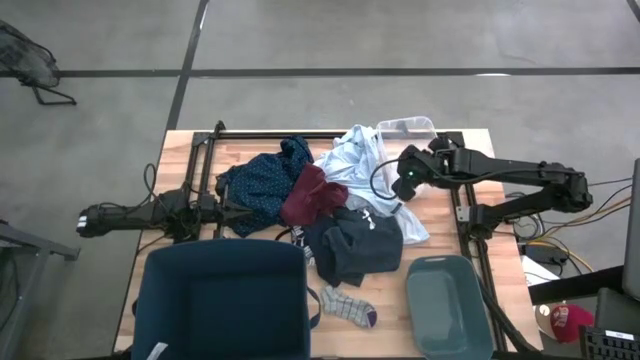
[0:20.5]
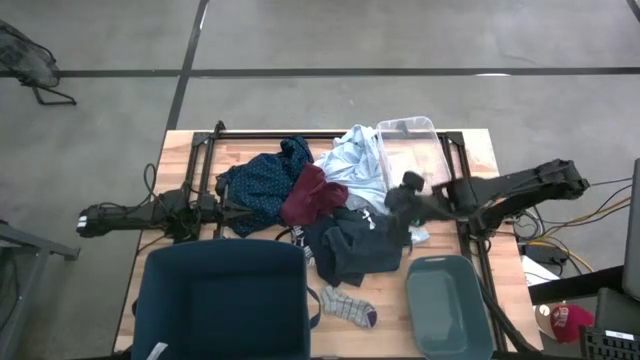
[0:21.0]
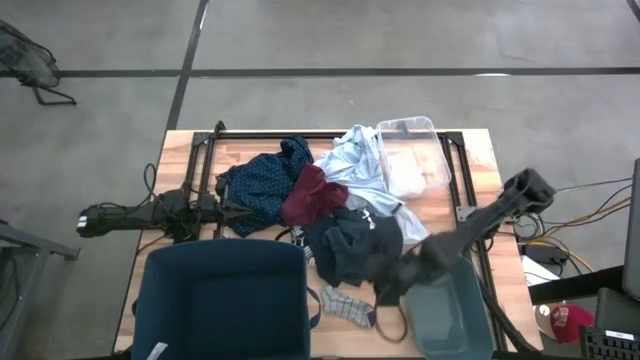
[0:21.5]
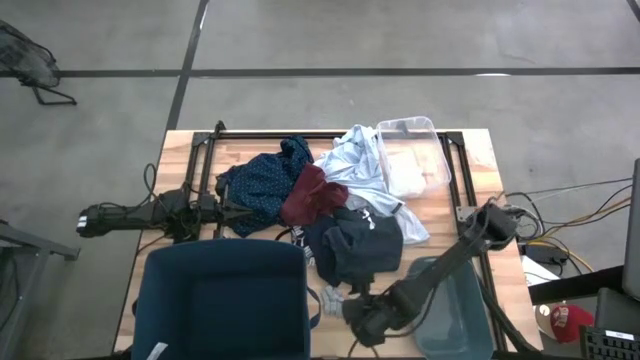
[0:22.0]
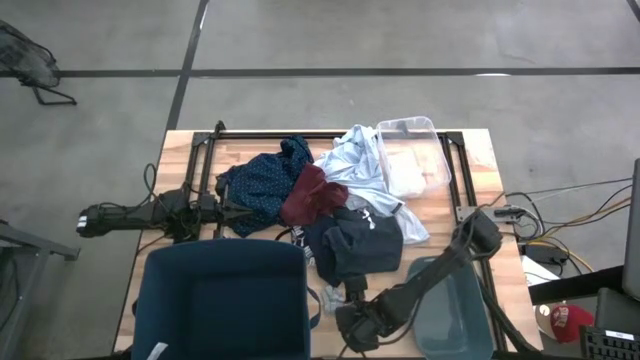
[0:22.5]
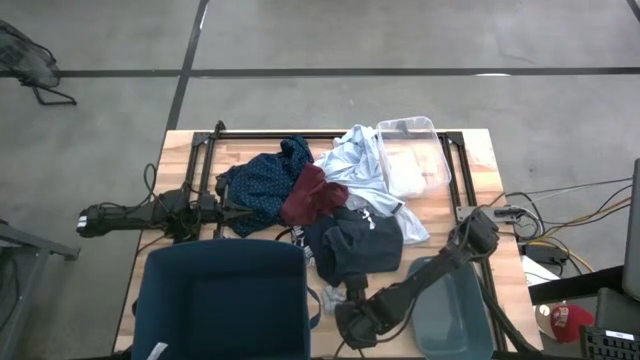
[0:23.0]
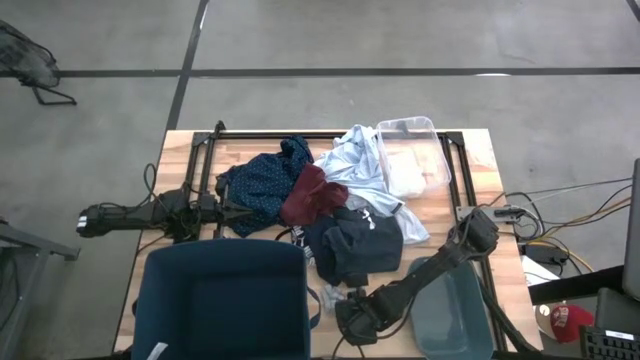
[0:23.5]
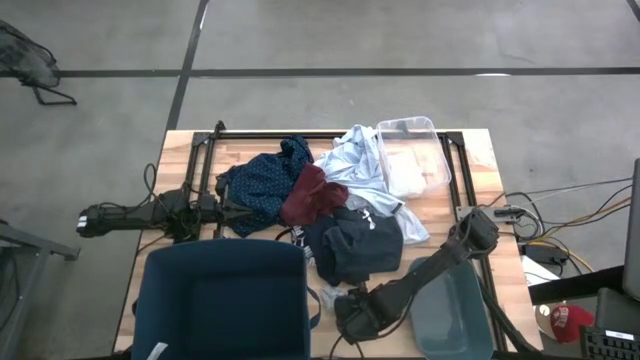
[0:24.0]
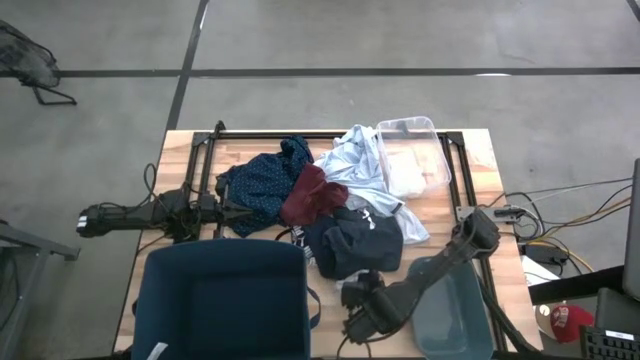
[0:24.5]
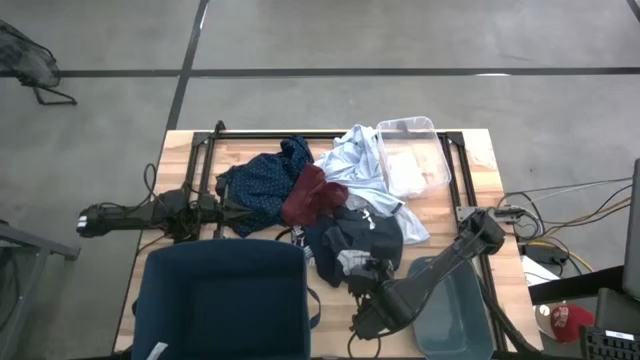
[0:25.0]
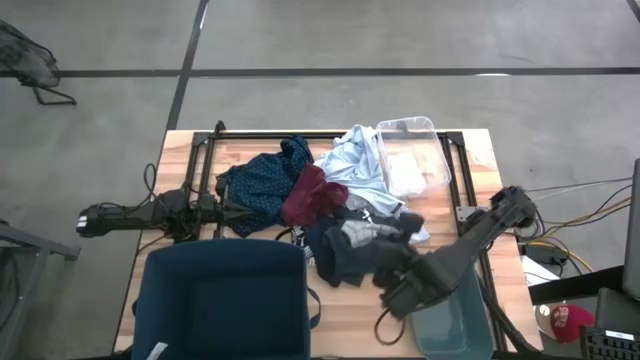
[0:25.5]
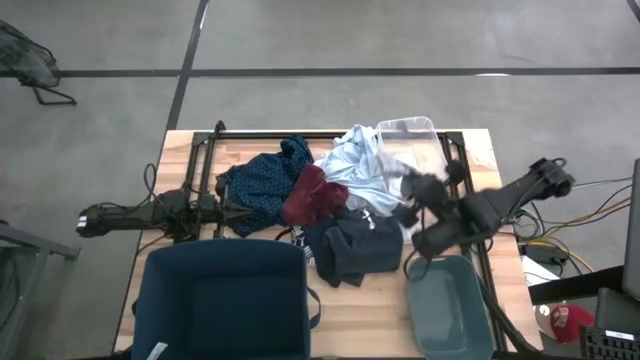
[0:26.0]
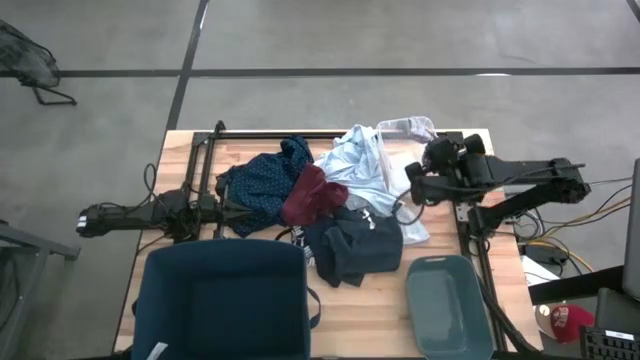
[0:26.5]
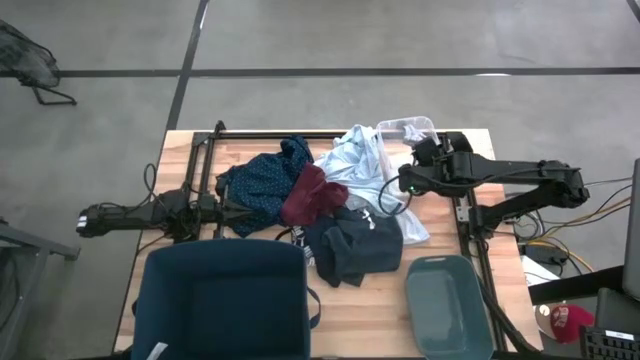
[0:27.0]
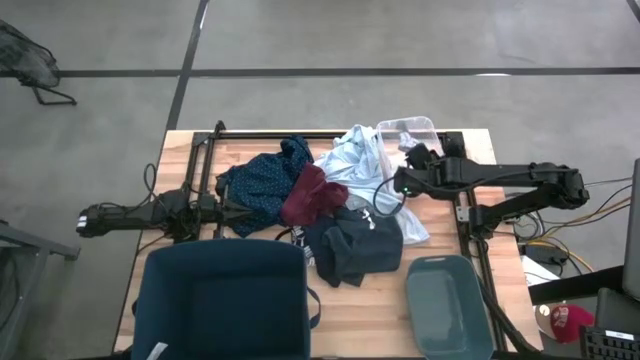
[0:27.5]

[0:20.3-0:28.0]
Task: Pick & Place Cloths
Put the gray sock into the transparent container

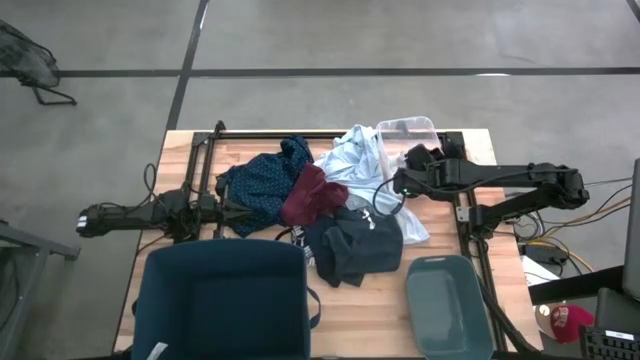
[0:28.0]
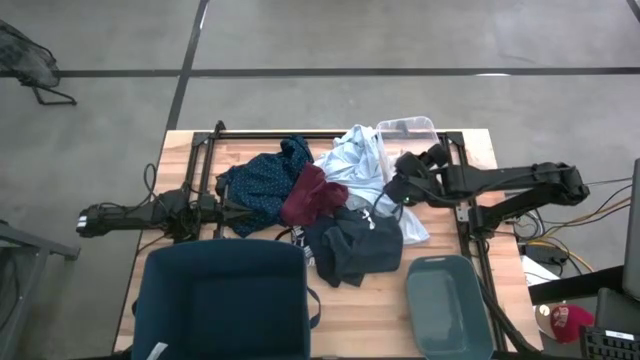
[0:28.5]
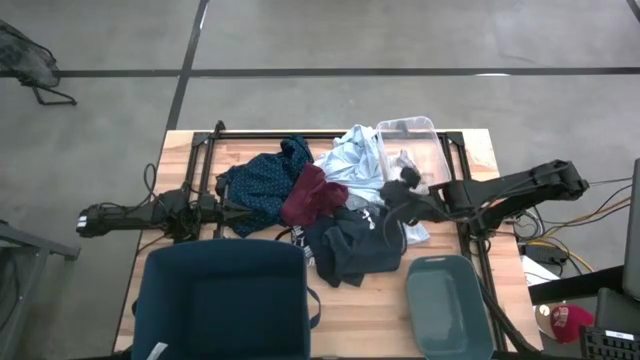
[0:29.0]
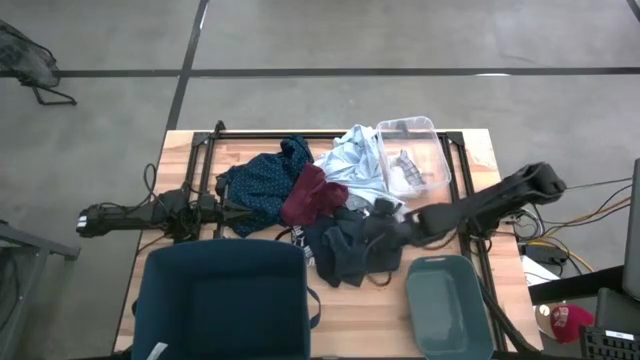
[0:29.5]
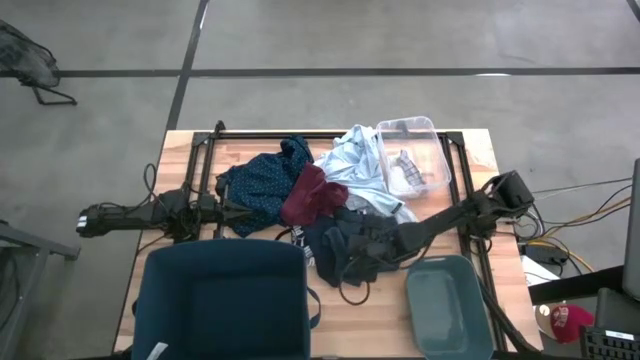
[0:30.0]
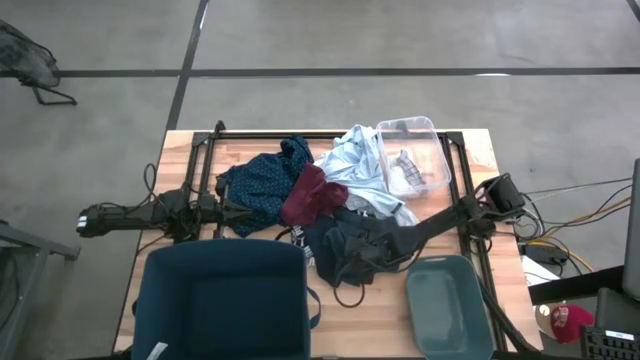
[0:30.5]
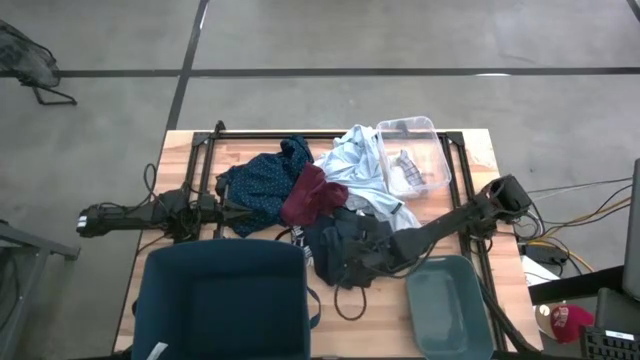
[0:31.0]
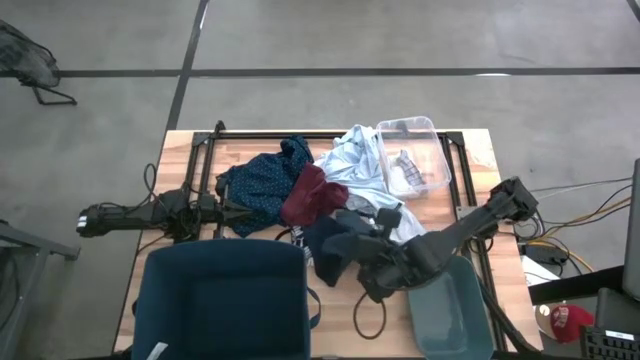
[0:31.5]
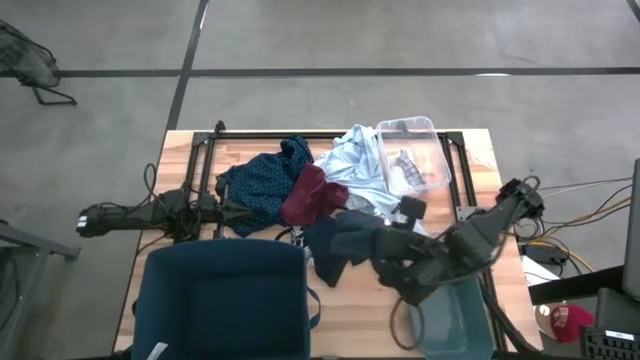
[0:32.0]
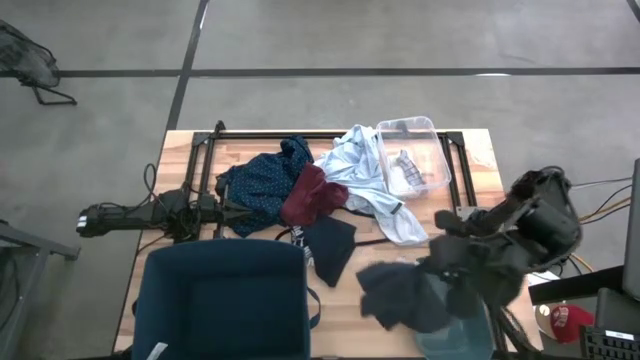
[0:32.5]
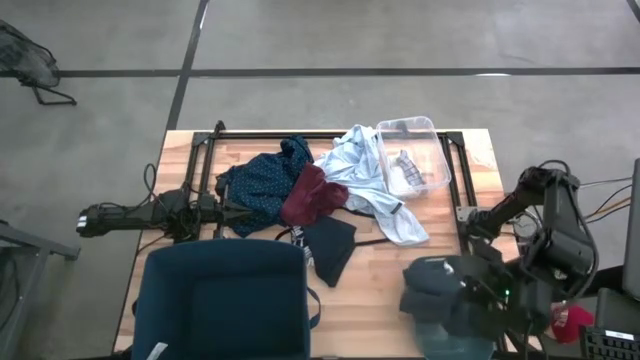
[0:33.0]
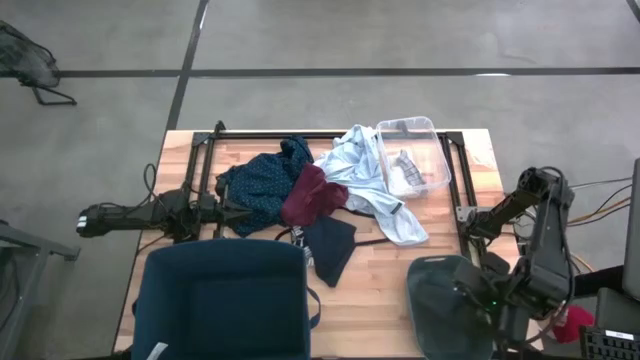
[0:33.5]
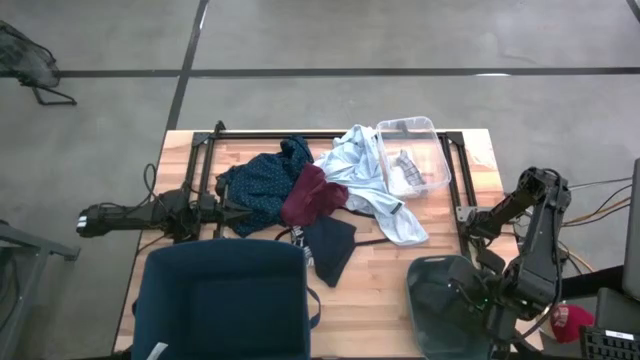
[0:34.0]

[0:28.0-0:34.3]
Put the gray underwear into the small blue container

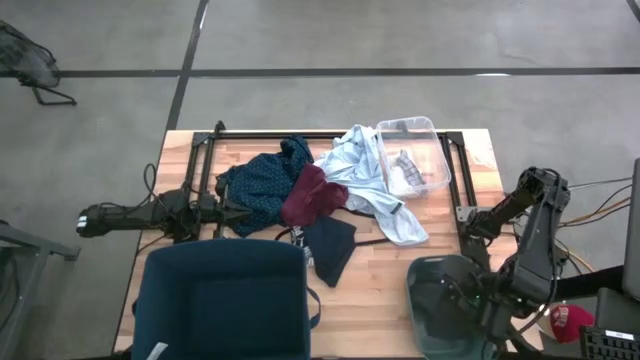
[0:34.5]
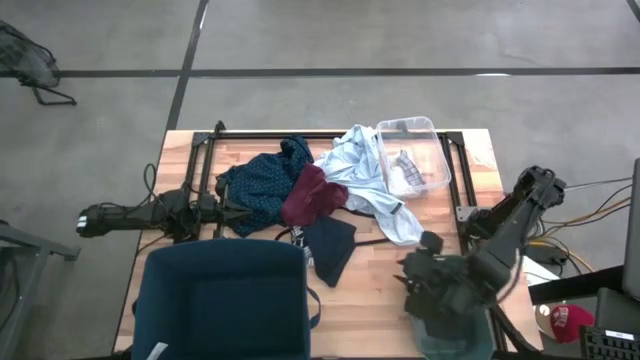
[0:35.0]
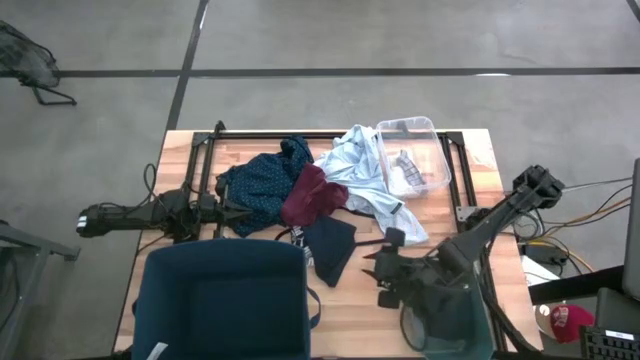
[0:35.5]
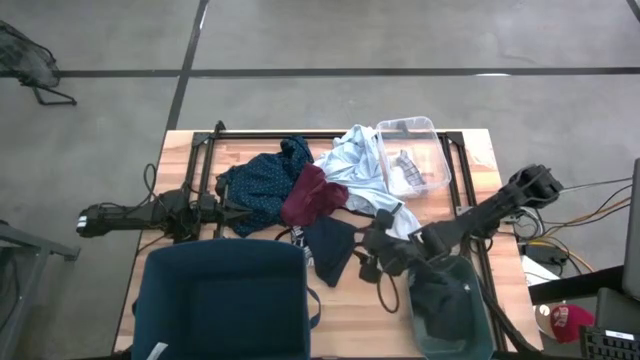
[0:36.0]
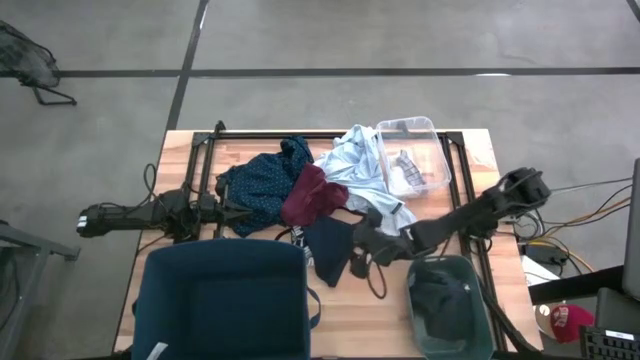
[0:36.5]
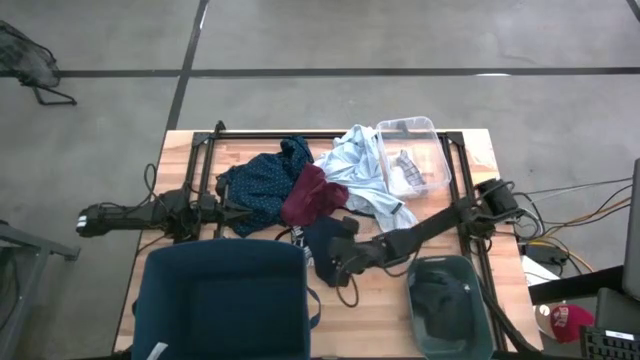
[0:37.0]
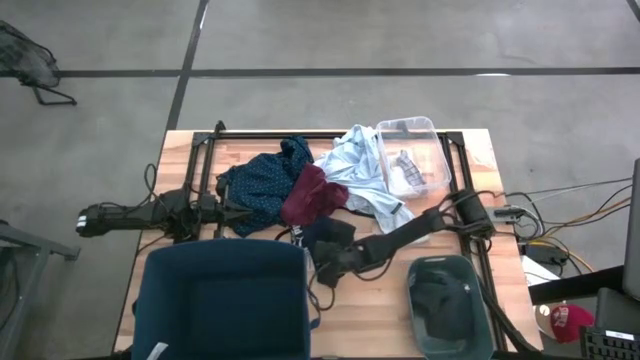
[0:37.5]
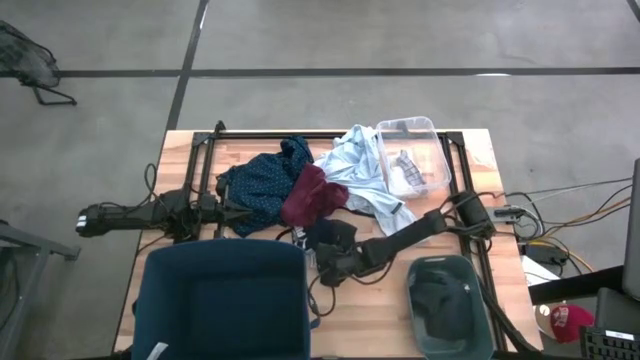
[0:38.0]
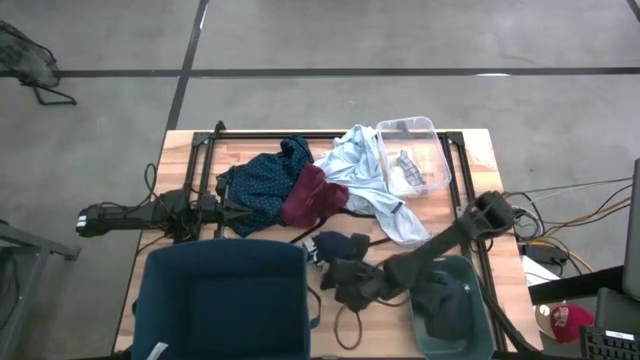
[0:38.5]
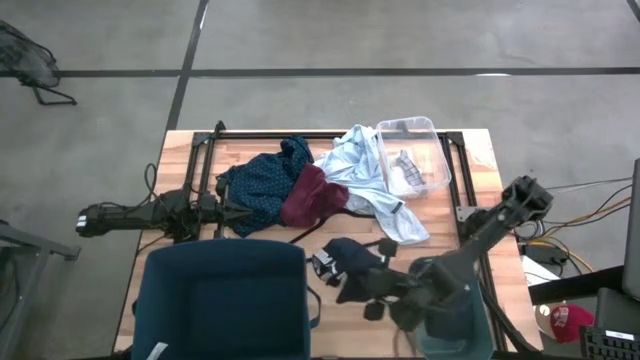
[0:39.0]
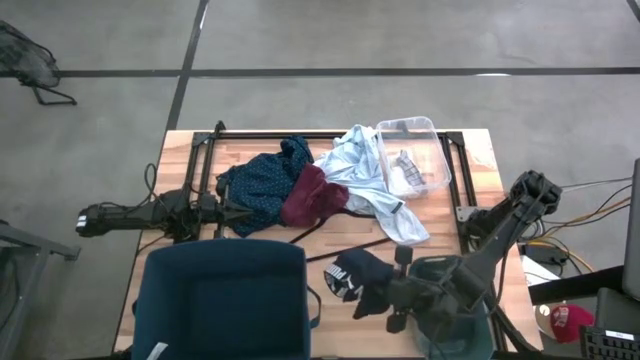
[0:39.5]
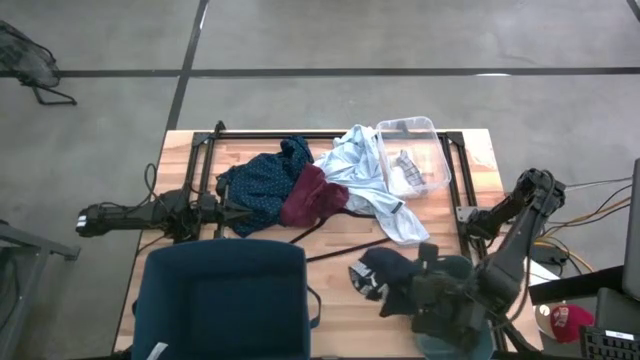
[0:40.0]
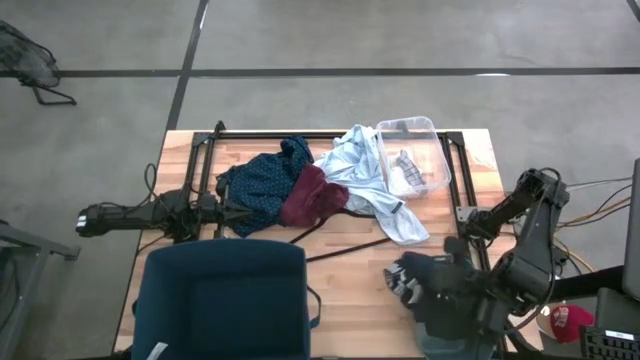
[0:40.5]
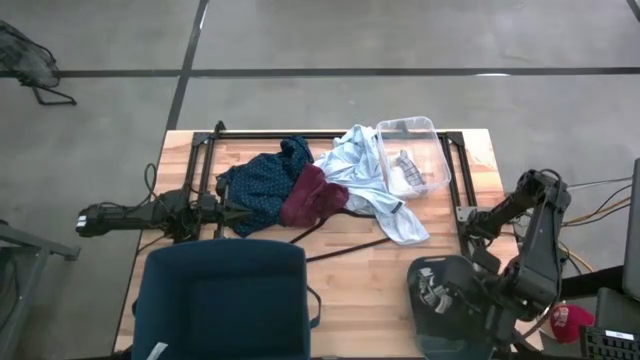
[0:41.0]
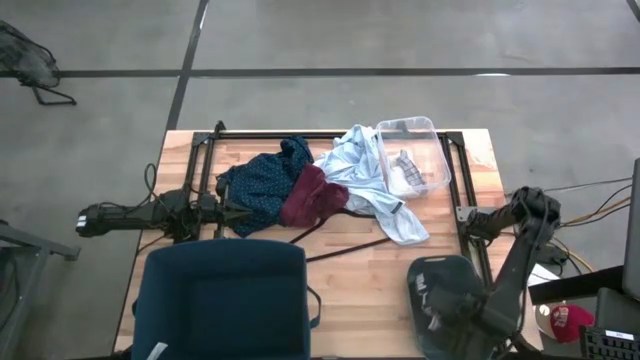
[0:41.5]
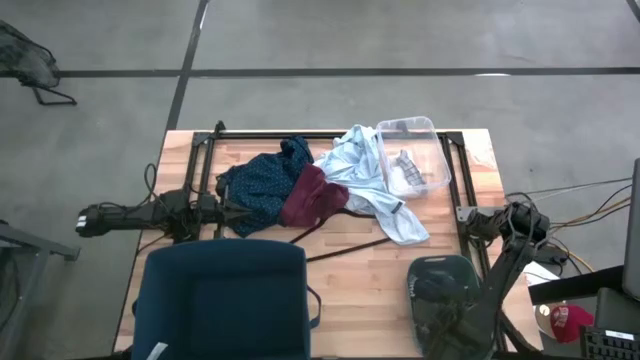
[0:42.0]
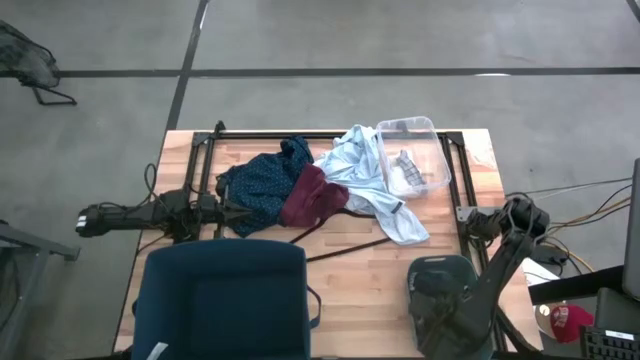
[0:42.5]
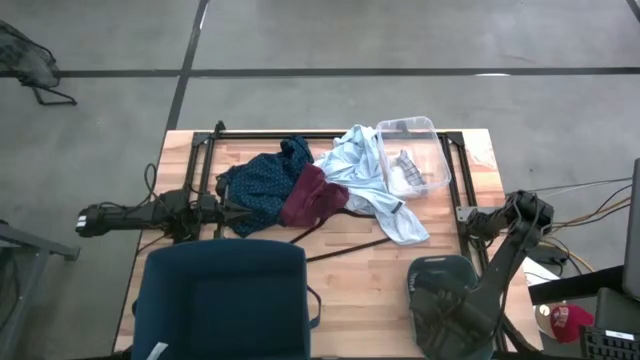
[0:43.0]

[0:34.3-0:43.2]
Put the blue underwear into the small blue container
